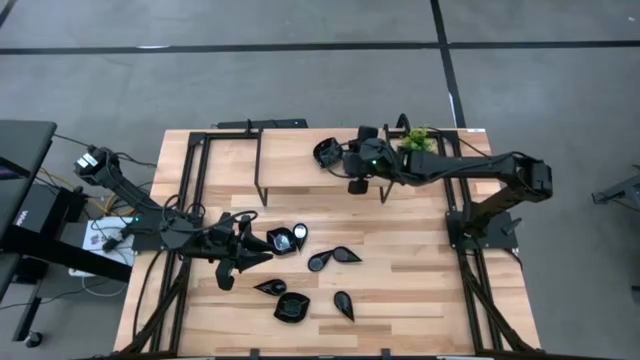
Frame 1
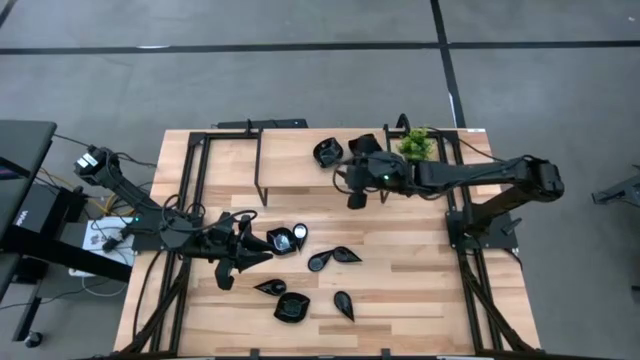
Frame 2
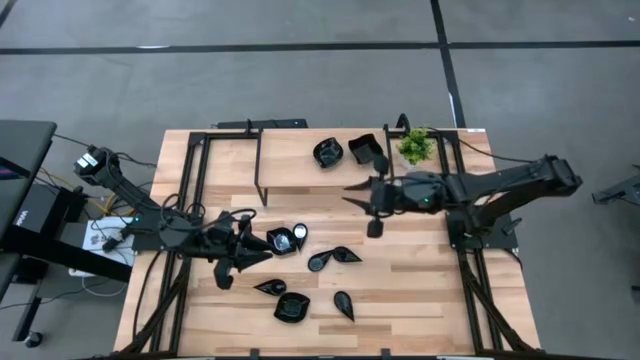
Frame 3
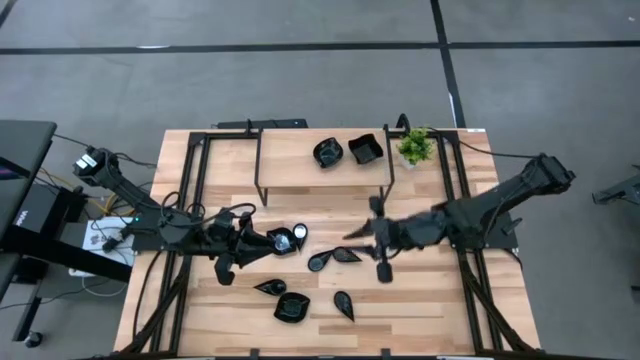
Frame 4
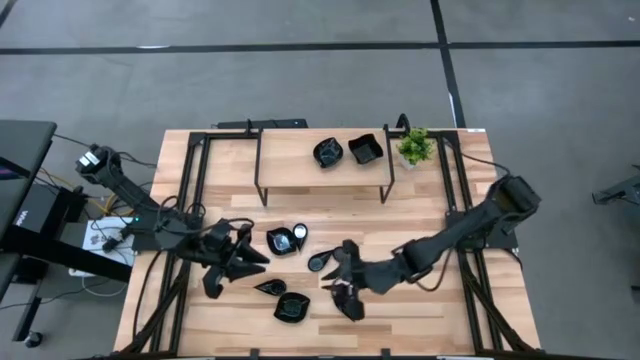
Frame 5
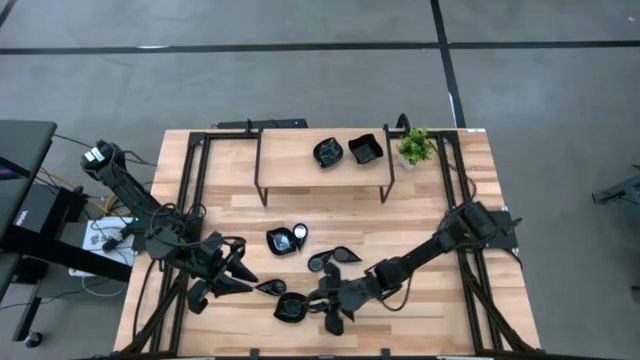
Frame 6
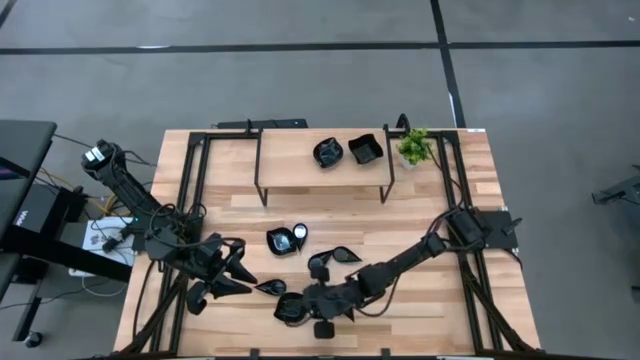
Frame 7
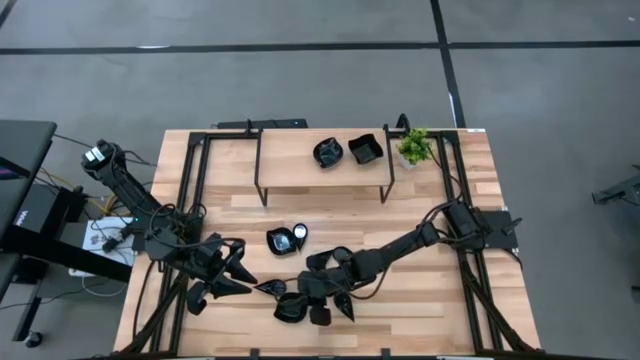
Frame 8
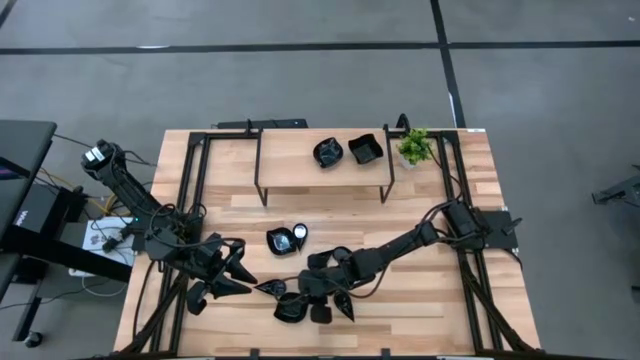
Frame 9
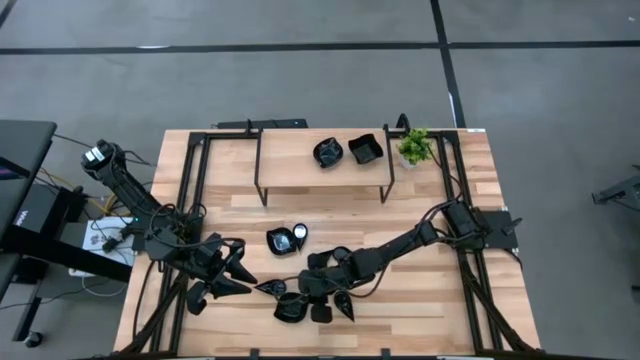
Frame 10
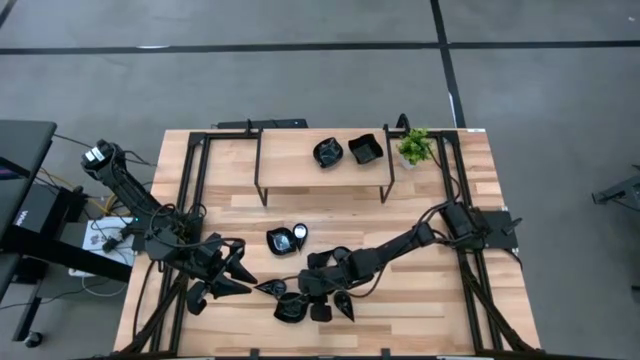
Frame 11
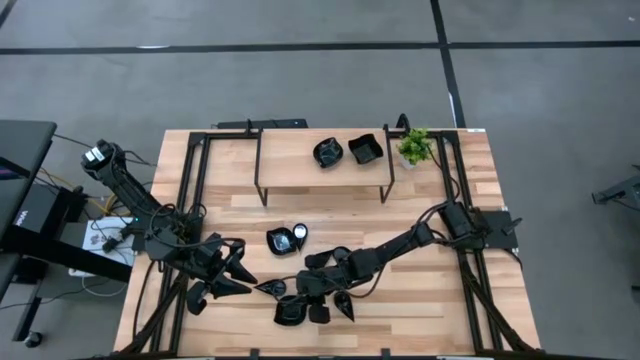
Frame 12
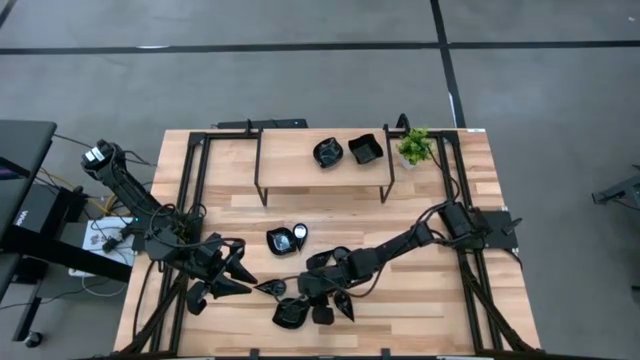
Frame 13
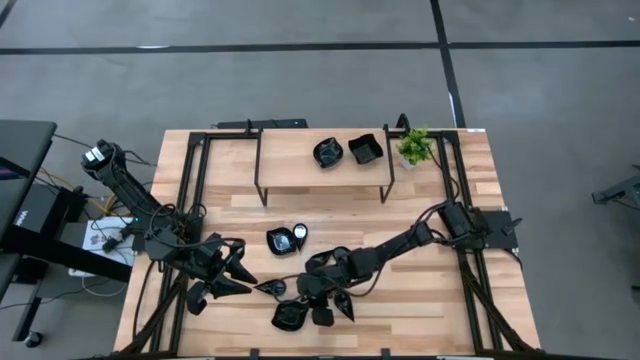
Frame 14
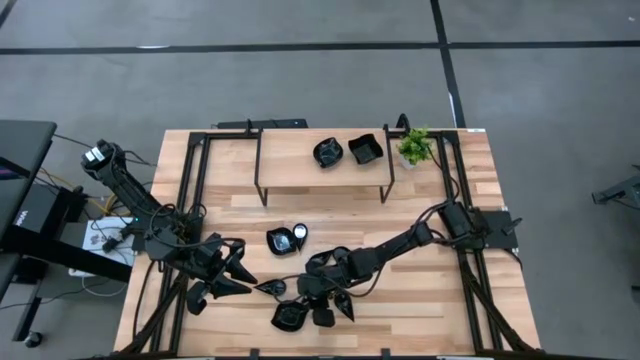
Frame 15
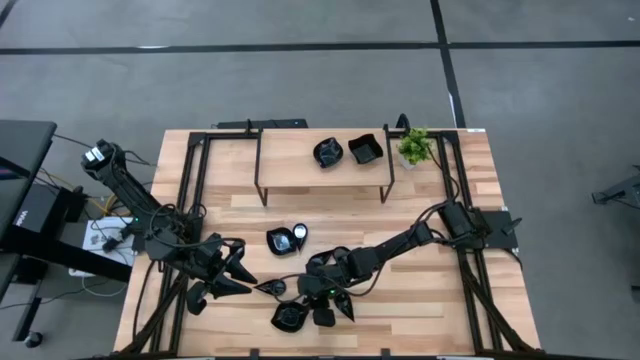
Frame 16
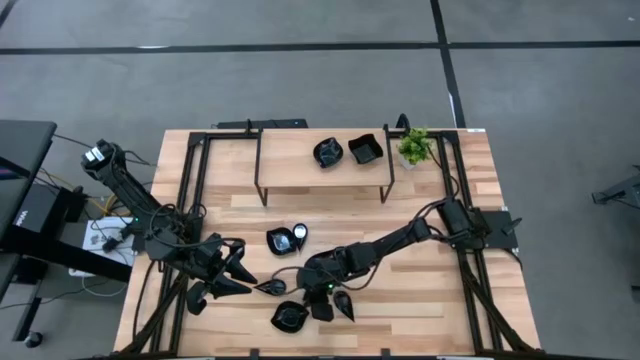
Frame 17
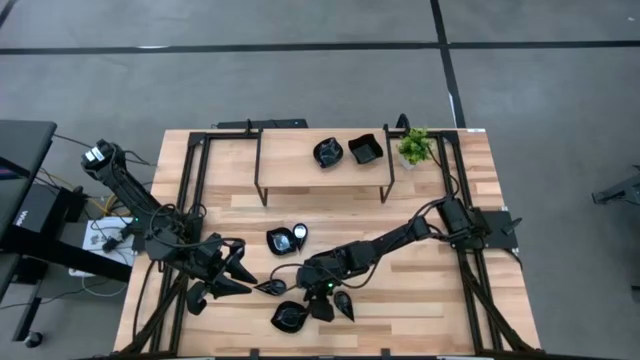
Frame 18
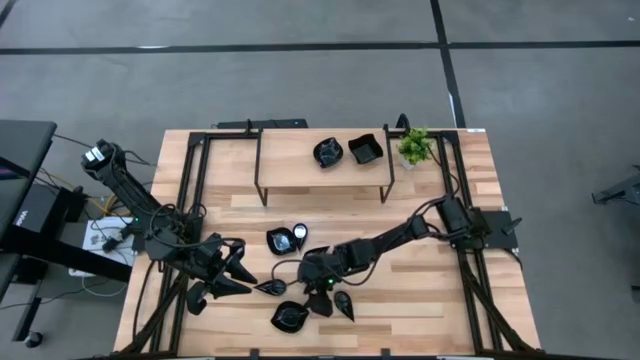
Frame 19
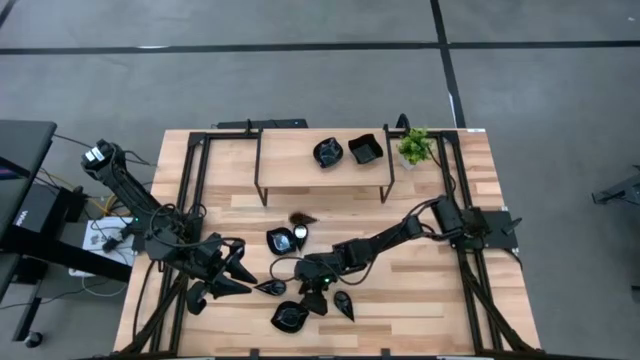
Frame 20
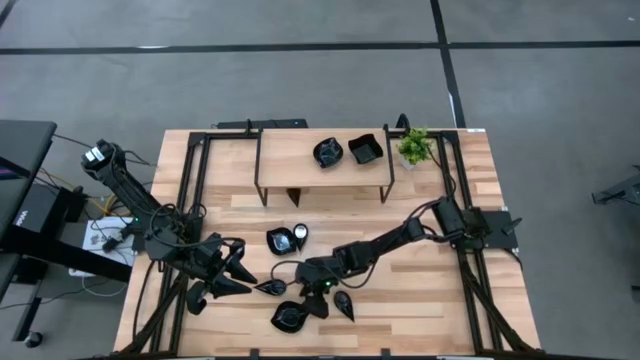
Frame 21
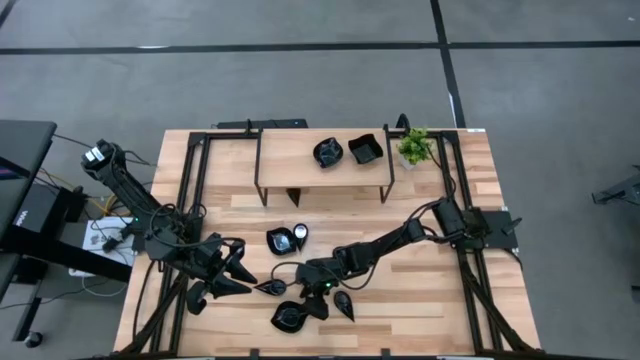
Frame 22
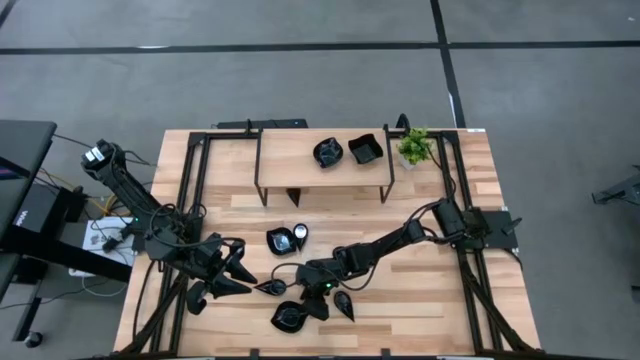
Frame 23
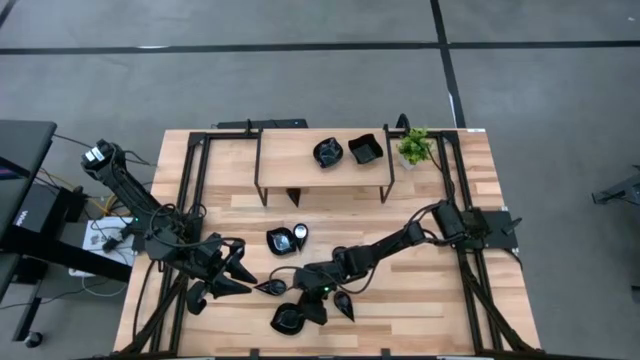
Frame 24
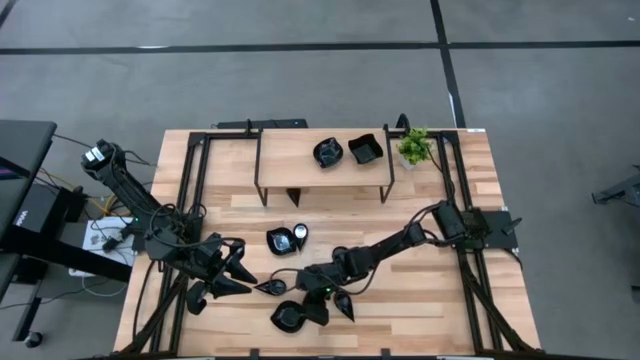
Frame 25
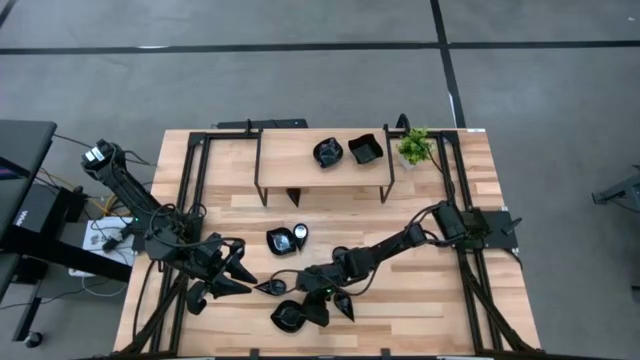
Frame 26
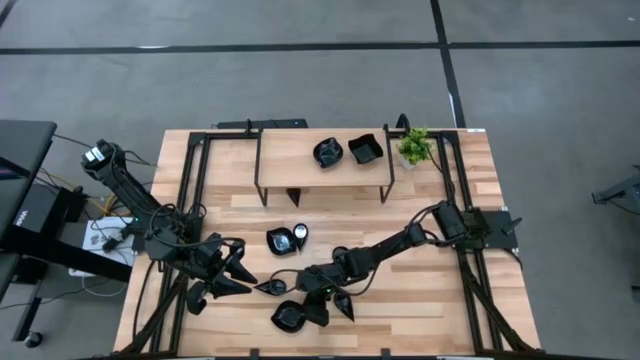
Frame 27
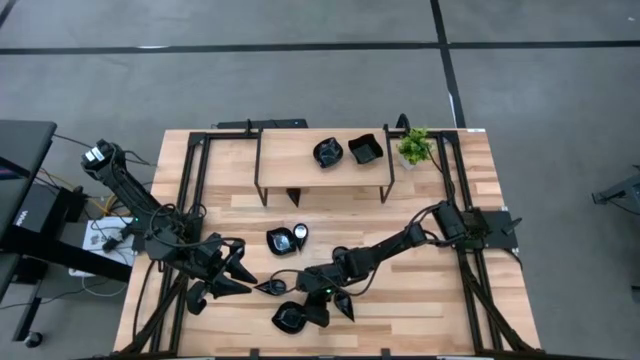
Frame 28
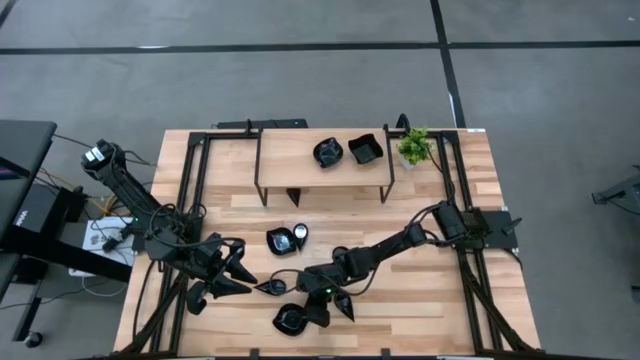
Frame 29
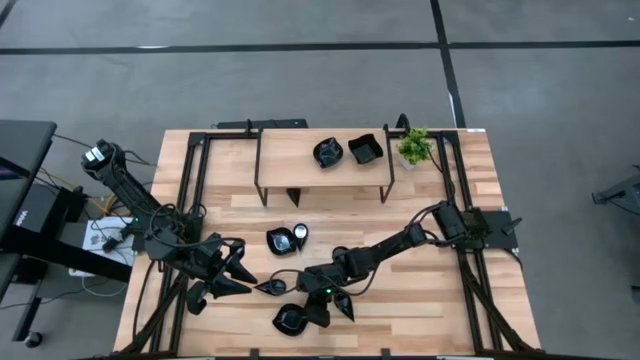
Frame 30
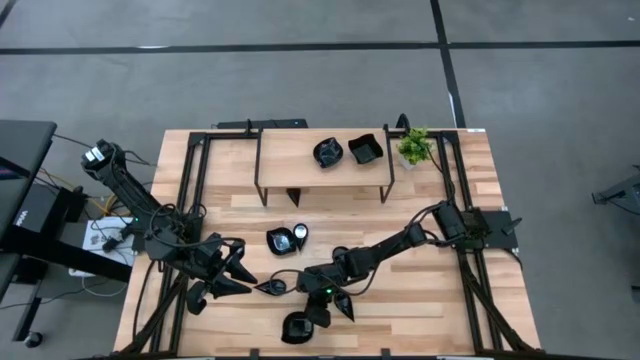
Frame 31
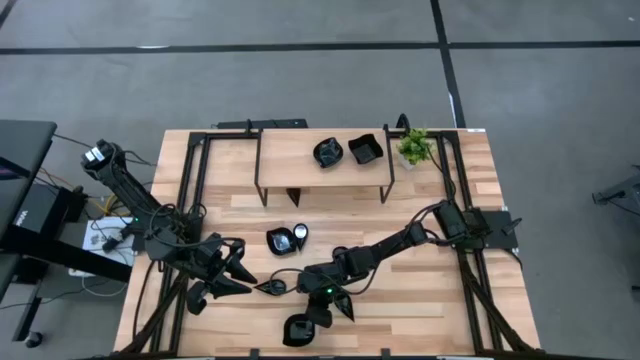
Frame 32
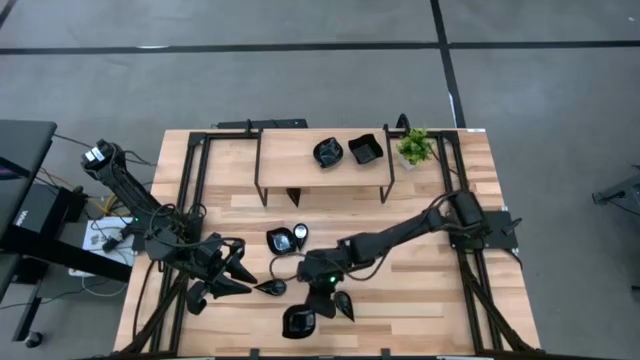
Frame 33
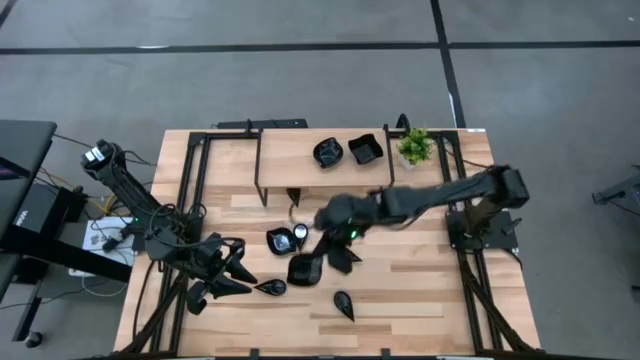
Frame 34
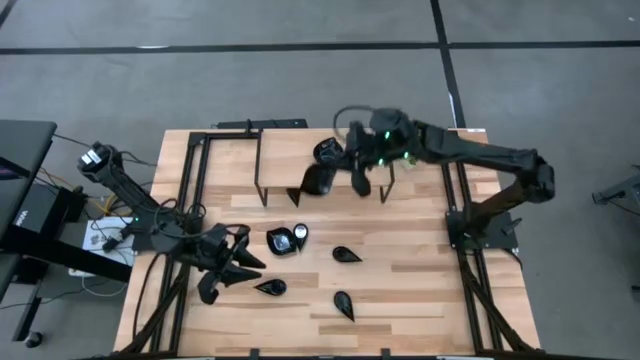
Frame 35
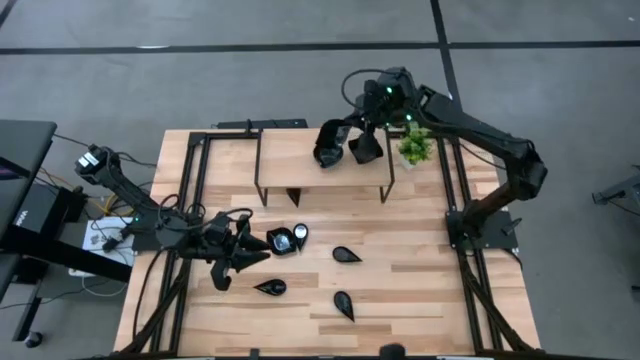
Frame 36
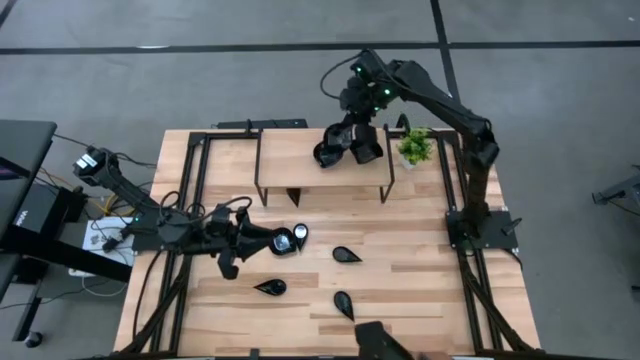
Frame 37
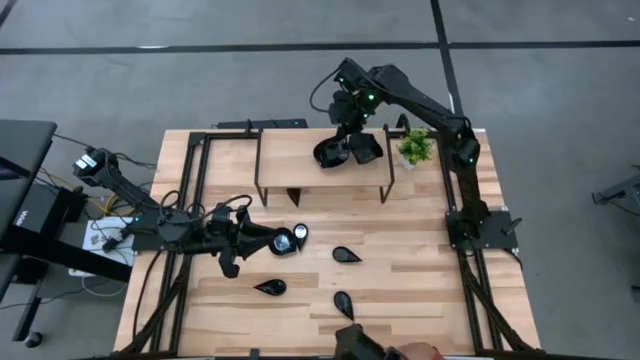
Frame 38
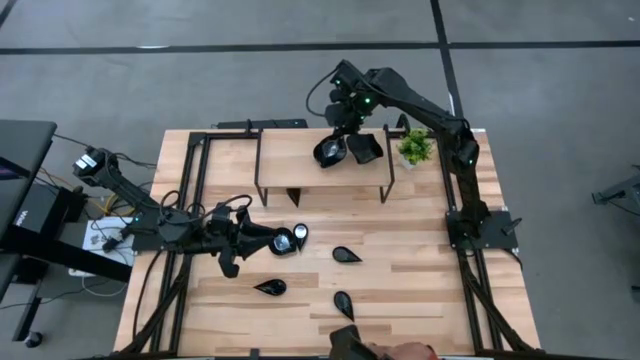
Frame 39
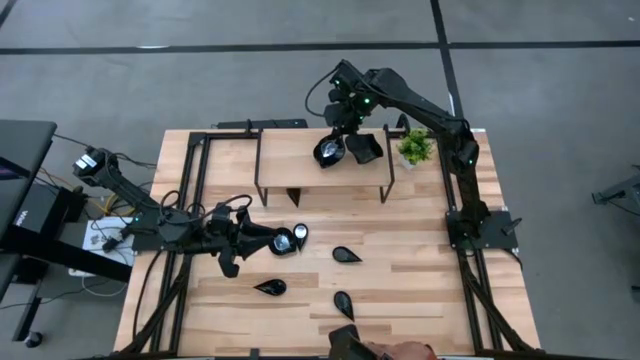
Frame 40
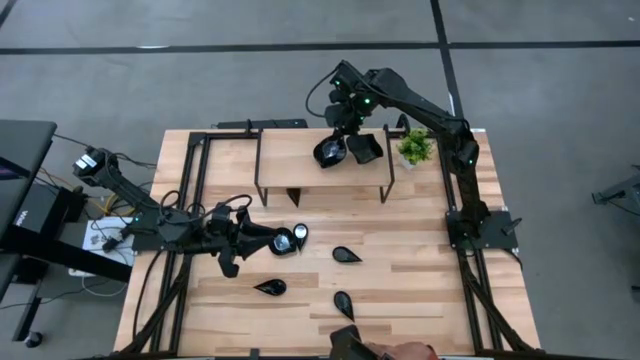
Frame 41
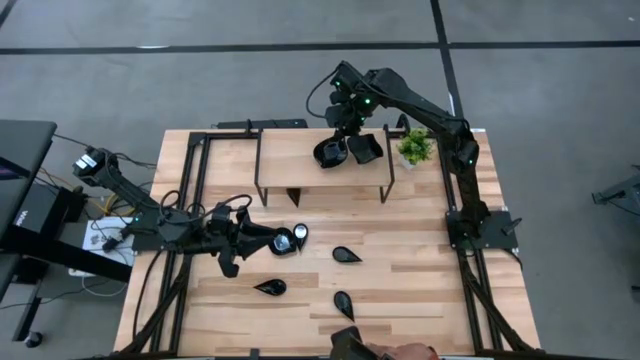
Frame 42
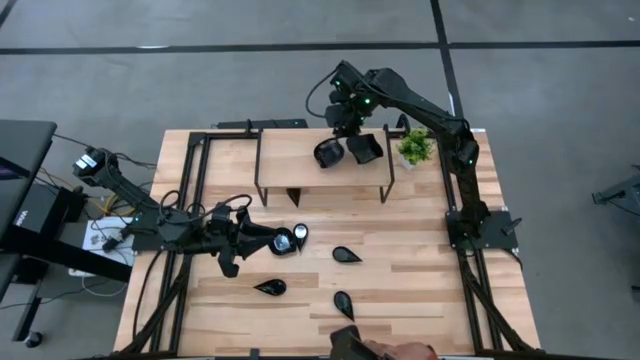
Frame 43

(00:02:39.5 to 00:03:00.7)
Task: Pick & Place Mini shaped plates
Stack the black leaf shaped plate on the black leaf shaped plate on the shelf
